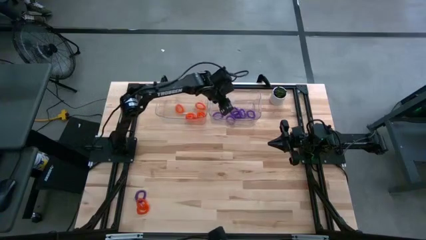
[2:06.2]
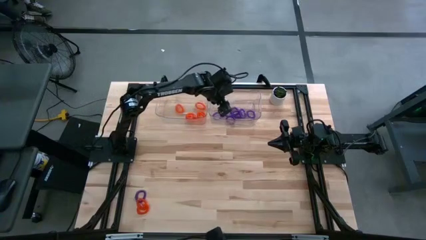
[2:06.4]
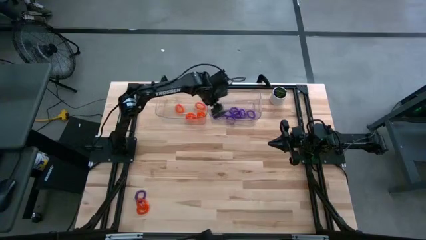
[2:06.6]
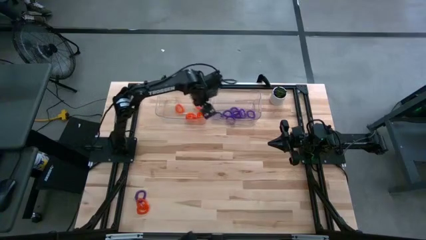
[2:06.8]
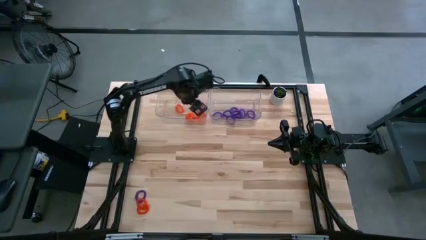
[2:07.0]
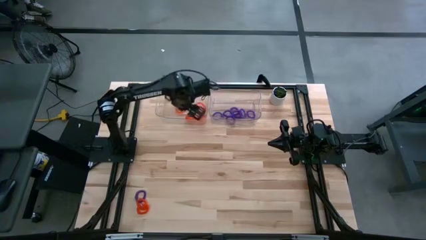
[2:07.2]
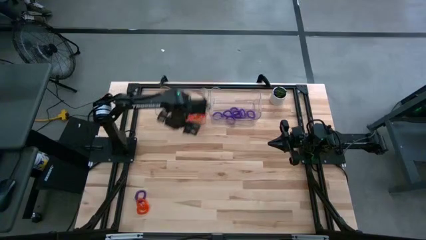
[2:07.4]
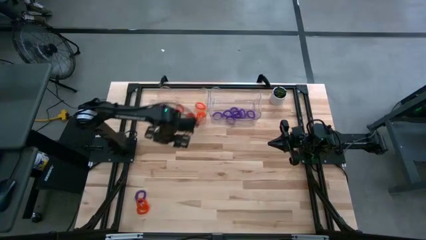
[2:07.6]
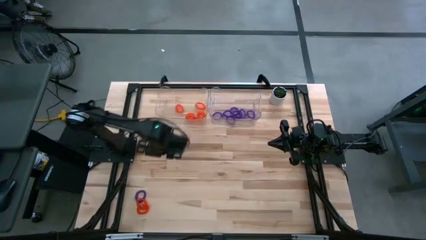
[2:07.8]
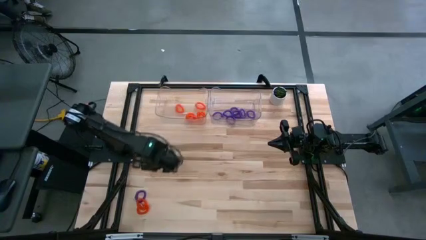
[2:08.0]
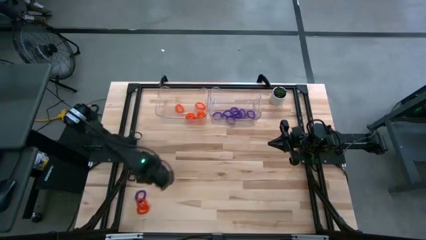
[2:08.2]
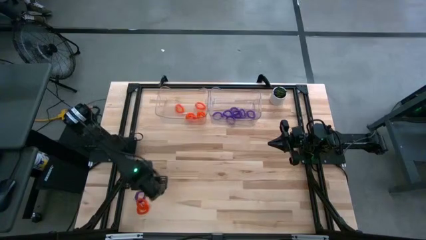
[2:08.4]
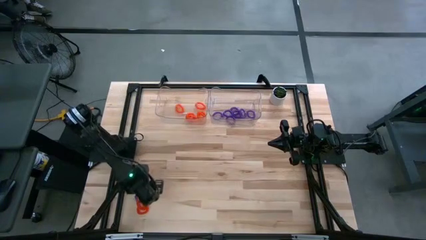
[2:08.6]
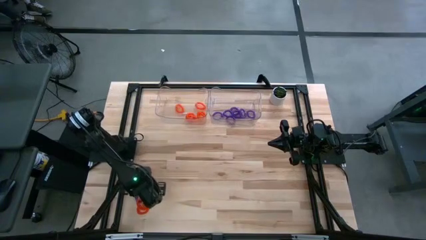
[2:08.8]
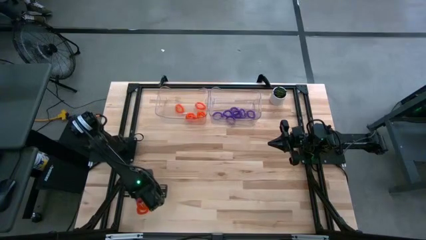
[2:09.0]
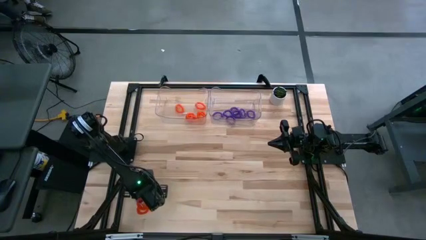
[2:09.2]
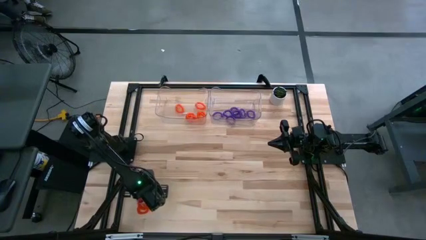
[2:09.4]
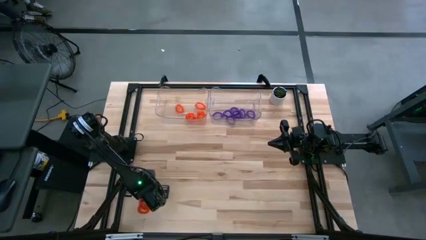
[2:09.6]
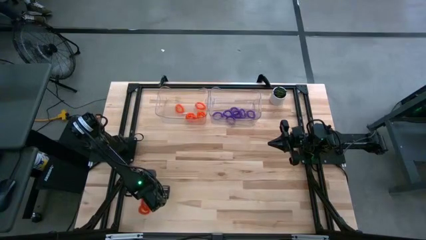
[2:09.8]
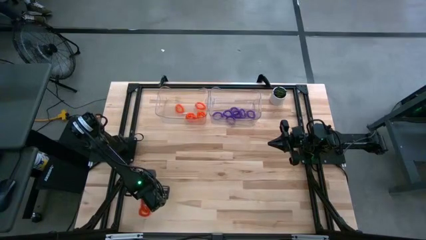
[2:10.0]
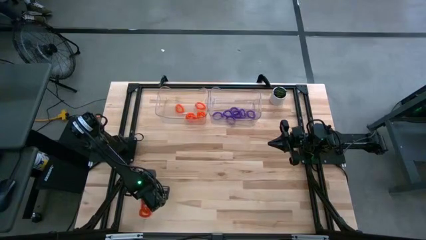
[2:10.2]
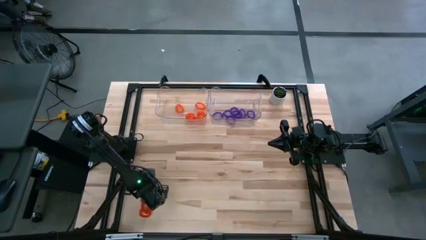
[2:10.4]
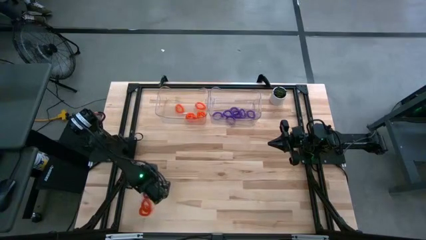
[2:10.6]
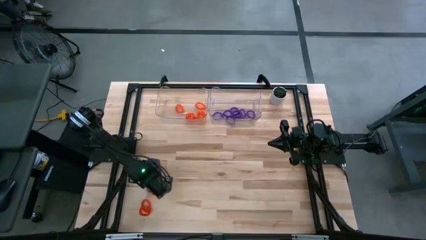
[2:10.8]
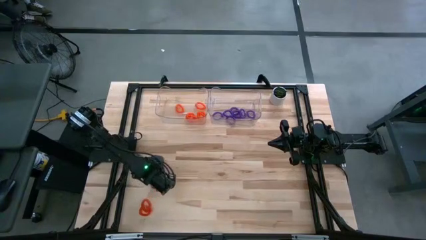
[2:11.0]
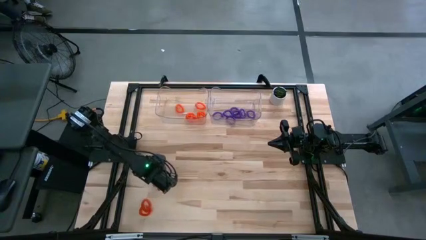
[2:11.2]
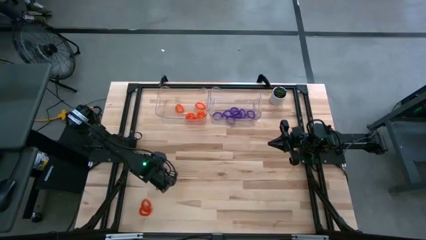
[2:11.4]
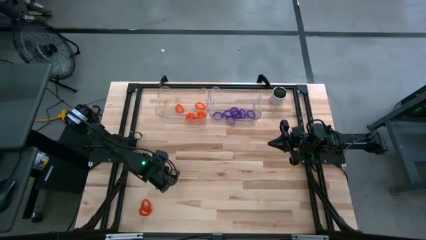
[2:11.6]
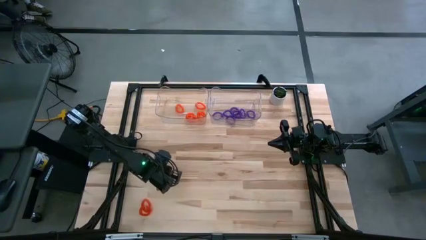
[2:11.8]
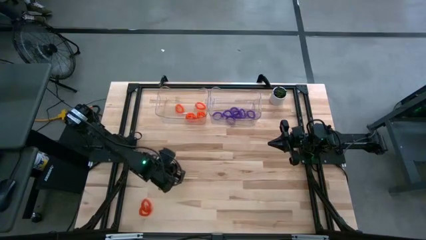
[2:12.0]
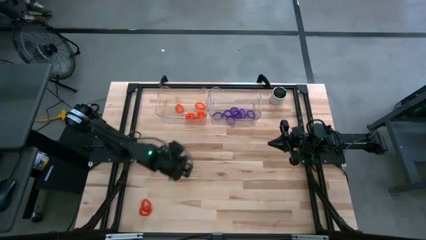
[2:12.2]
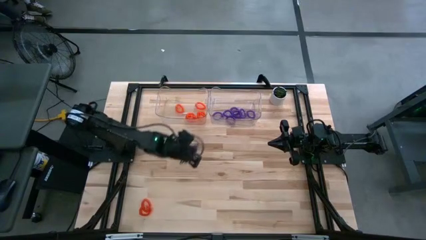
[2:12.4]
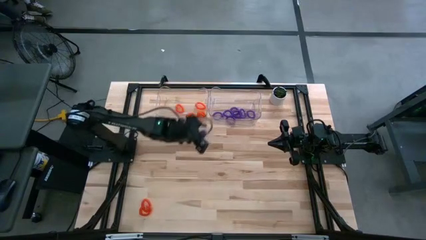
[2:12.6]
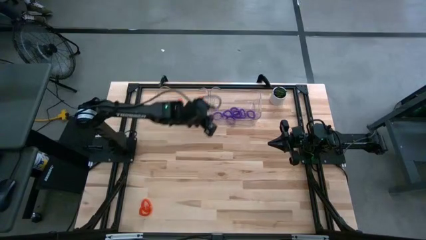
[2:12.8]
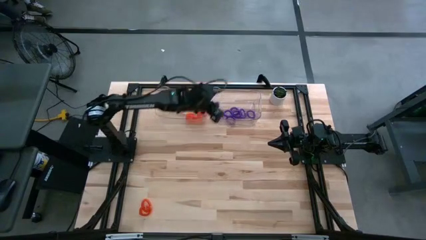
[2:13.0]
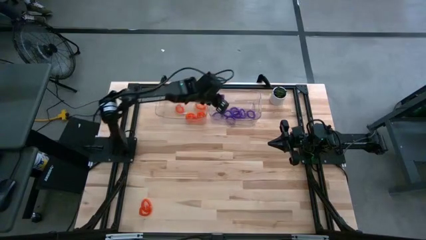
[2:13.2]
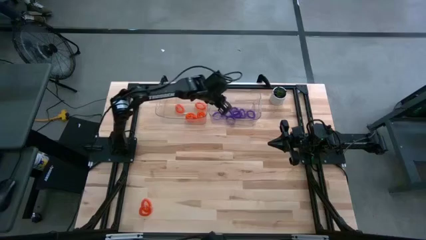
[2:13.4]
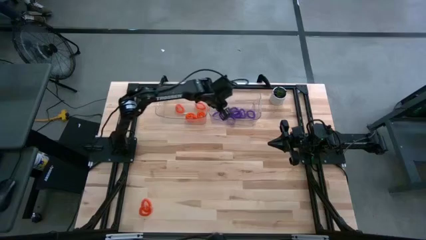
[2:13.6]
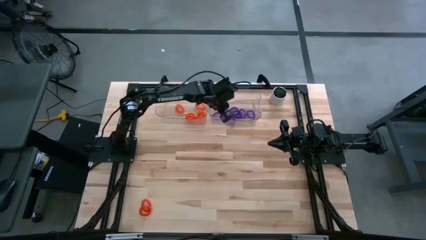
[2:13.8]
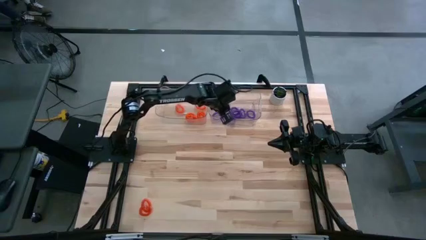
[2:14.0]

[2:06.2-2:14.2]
Task: Sort spring keychains
Put the violet spring keychain into the right transparent bin

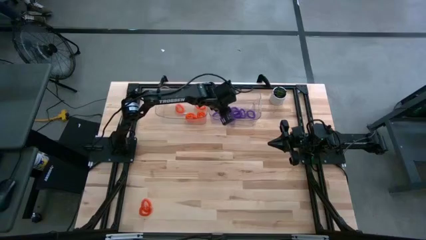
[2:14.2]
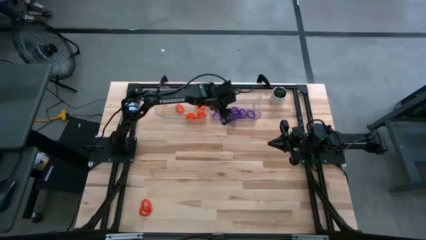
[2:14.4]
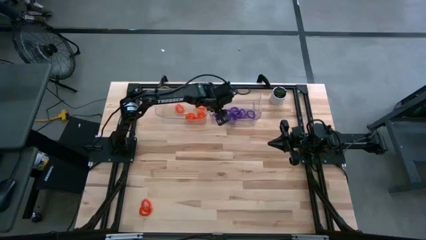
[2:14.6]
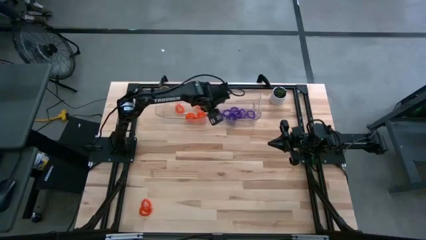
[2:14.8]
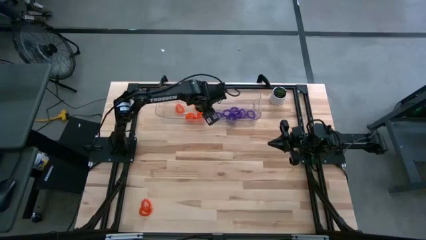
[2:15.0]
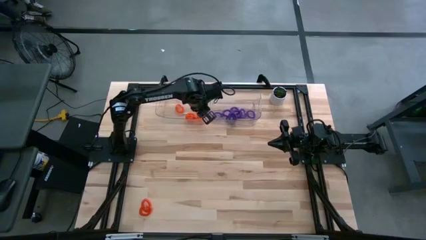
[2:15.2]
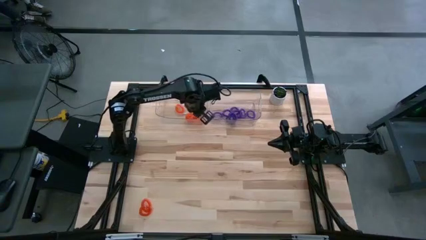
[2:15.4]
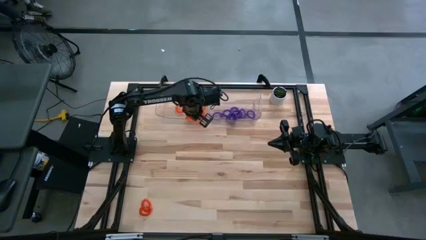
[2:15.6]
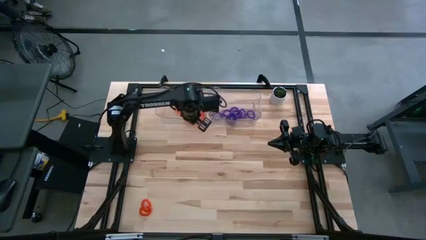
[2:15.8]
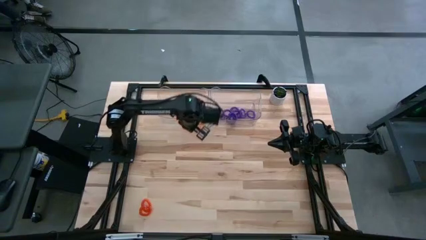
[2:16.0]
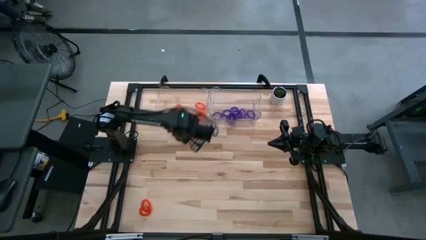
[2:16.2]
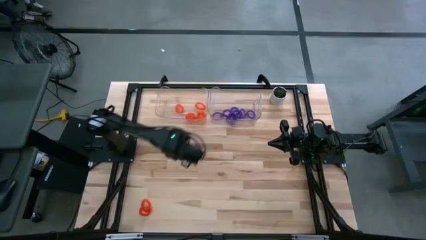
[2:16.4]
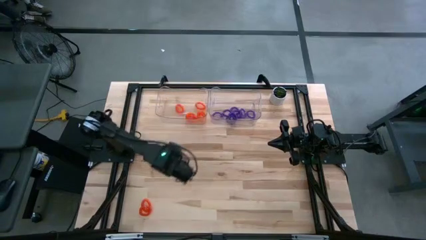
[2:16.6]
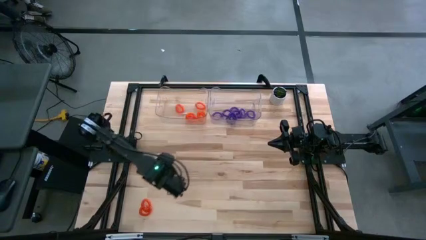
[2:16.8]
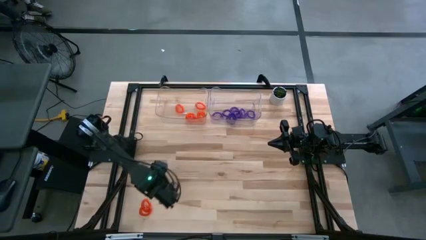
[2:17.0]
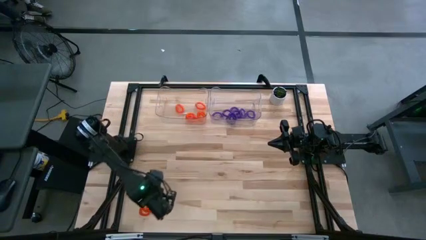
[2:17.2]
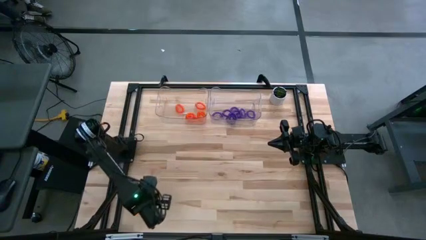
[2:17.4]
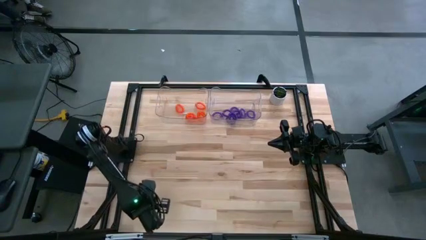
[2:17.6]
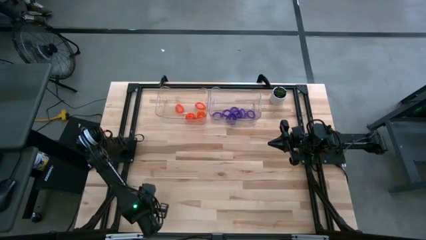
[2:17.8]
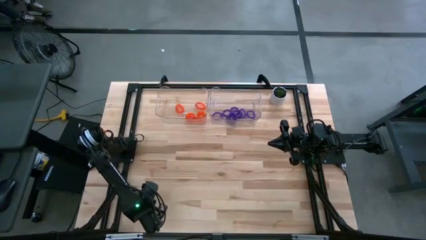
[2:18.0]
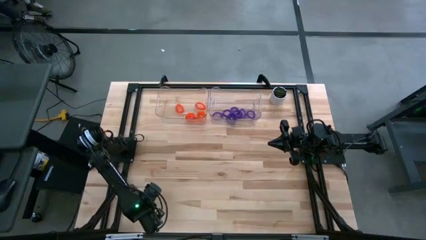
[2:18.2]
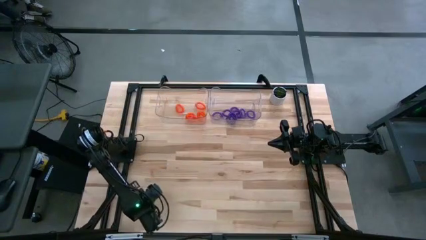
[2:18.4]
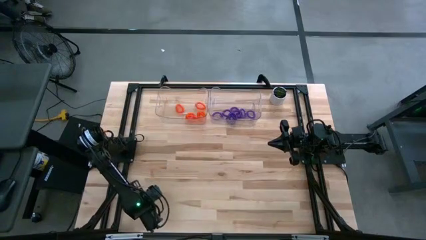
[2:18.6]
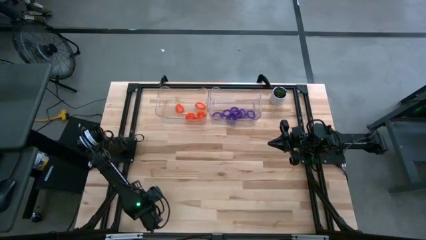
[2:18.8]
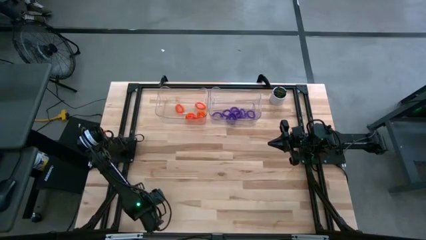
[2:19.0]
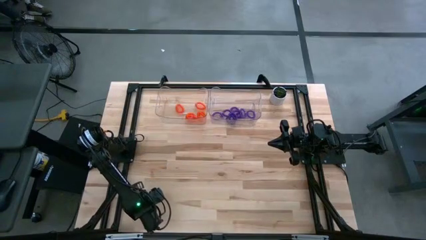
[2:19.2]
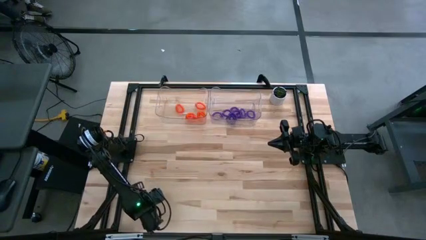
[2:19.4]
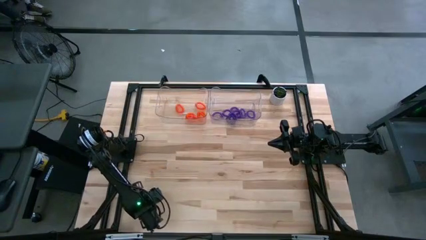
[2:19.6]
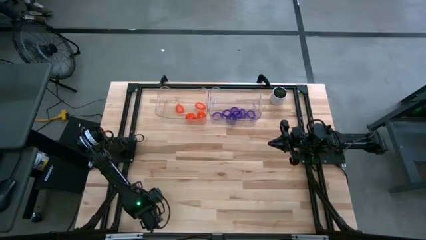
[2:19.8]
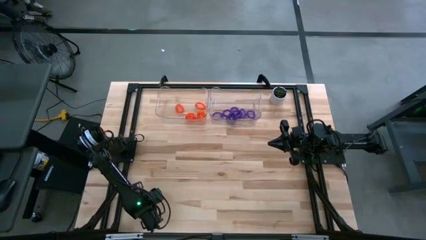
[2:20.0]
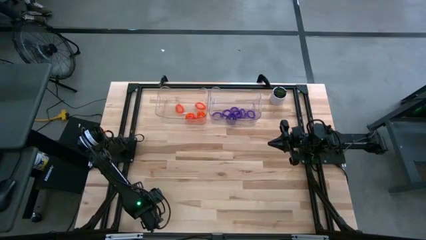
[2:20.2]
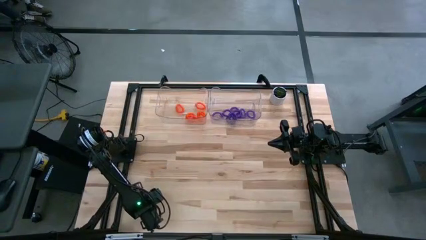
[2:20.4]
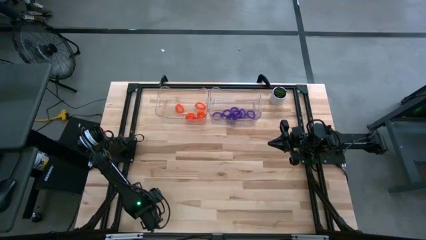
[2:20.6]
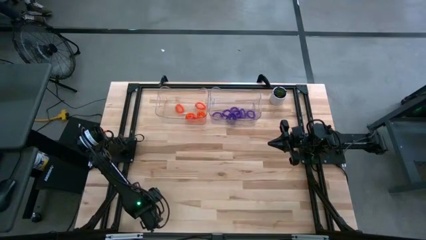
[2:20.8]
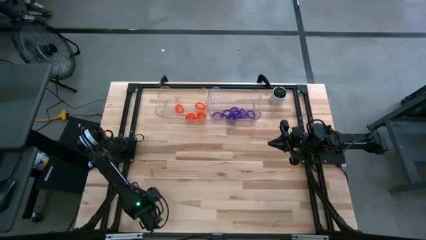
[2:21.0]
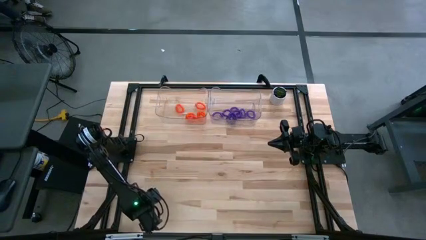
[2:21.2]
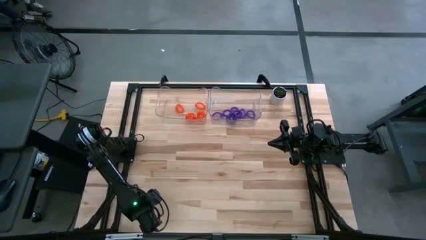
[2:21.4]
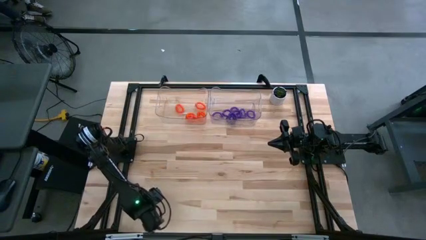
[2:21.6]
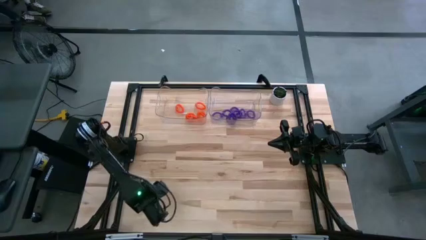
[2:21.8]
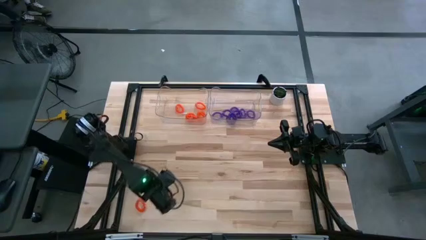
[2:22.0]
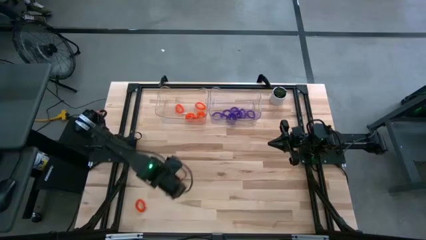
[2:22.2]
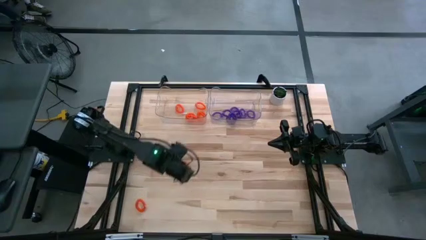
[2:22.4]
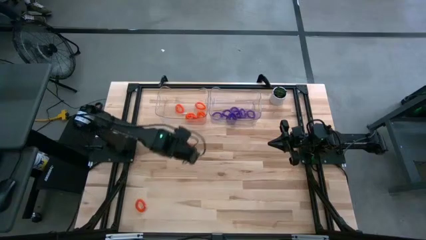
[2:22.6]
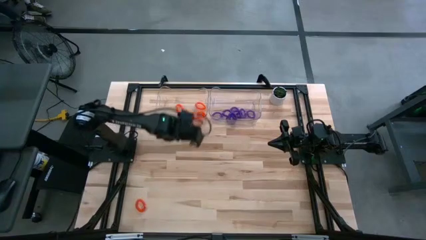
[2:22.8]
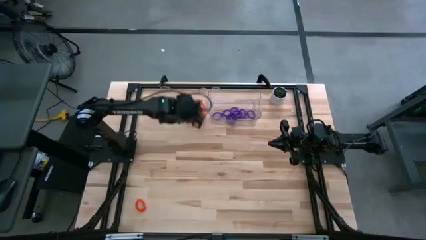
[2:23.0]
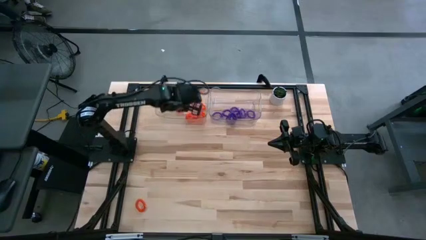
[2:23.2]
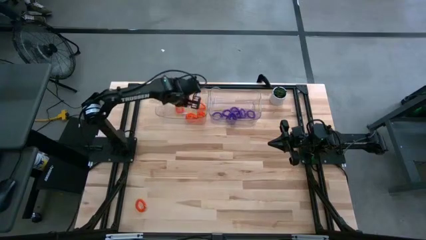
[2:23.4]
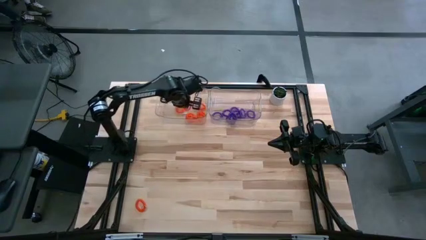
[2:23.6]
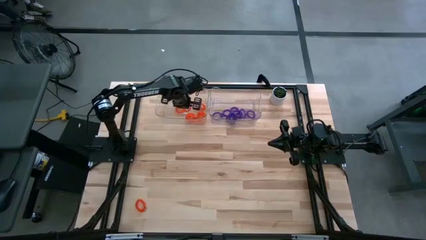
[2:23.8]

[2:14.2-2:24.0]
Put the orange spring keychain into the left transparent bin
